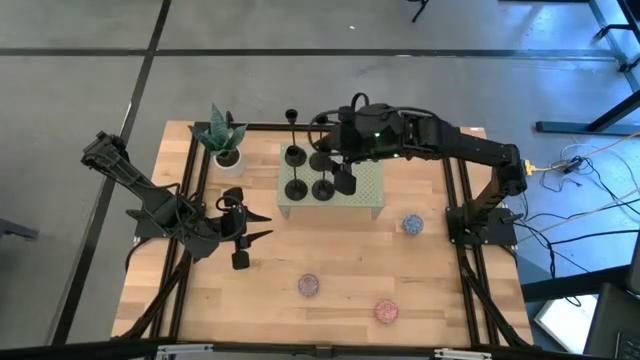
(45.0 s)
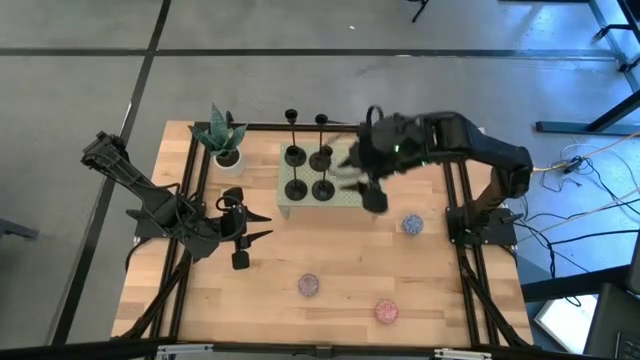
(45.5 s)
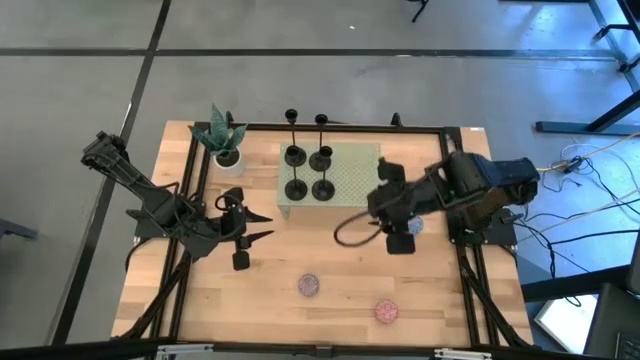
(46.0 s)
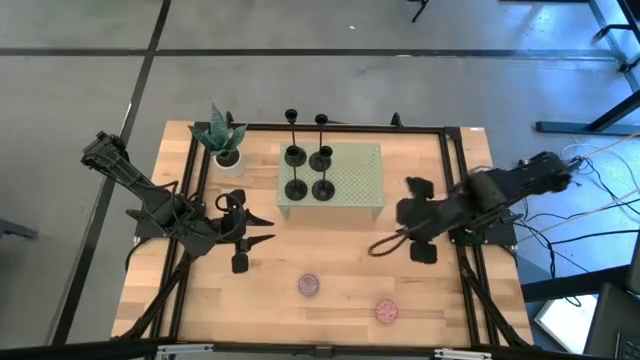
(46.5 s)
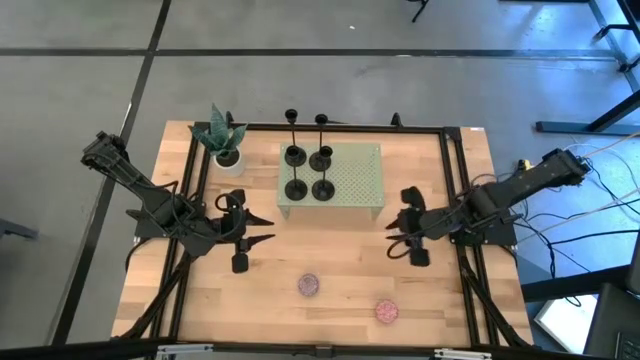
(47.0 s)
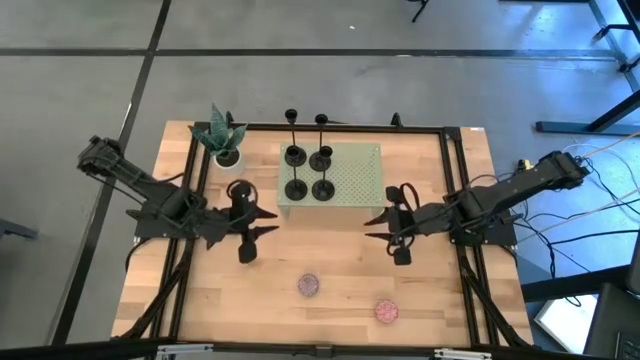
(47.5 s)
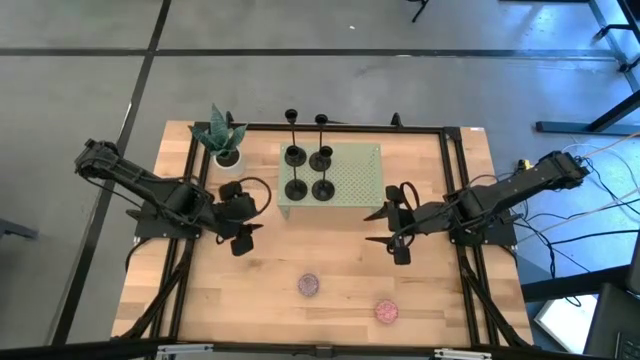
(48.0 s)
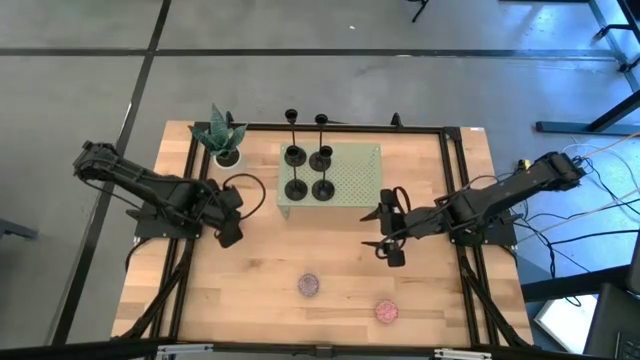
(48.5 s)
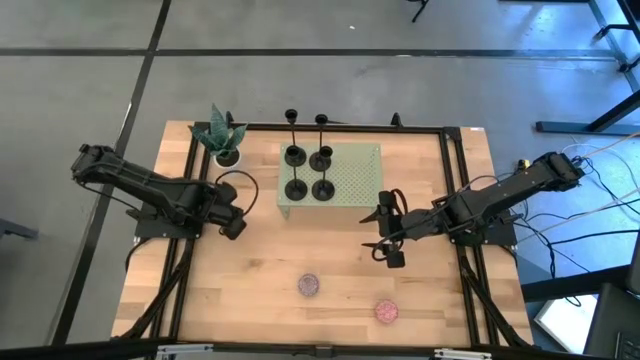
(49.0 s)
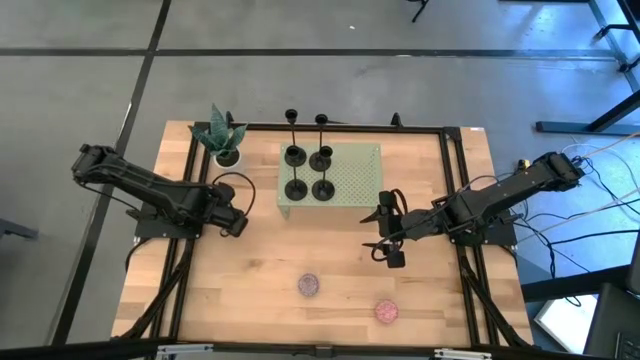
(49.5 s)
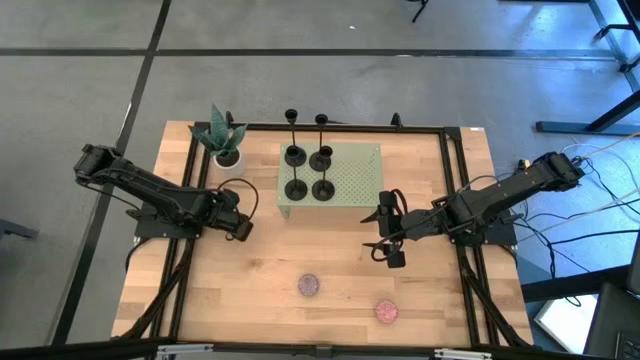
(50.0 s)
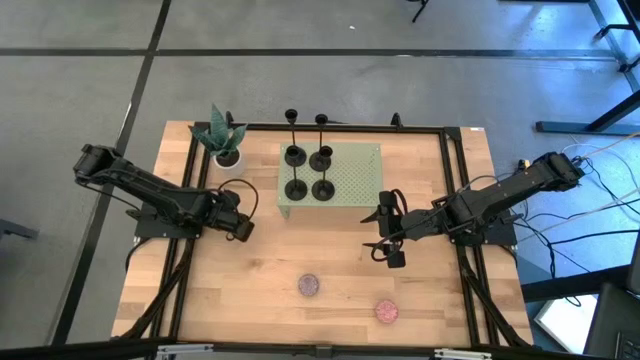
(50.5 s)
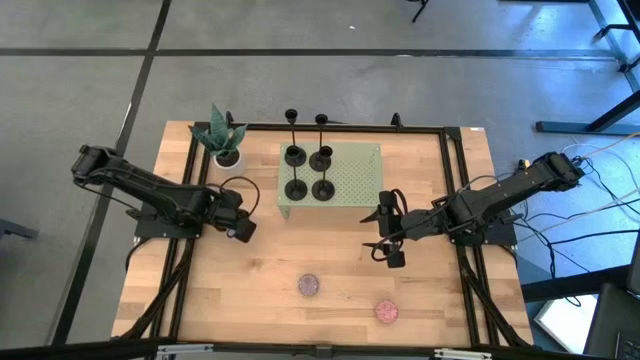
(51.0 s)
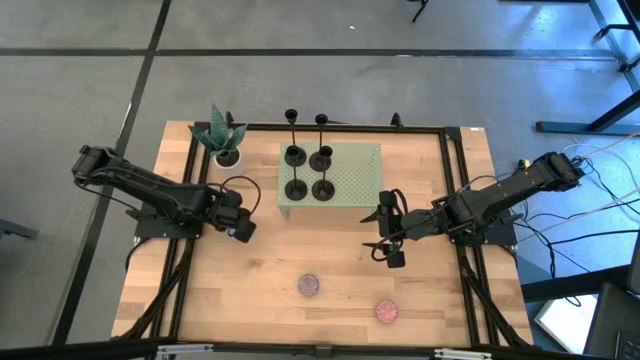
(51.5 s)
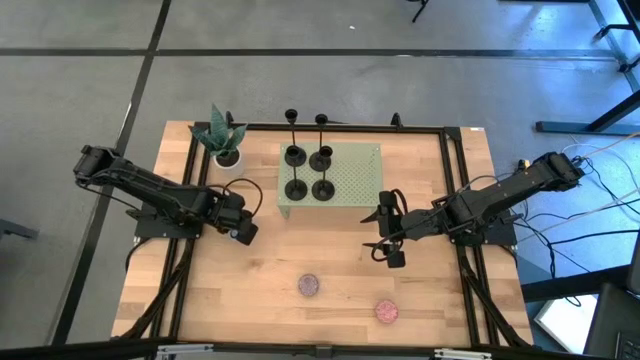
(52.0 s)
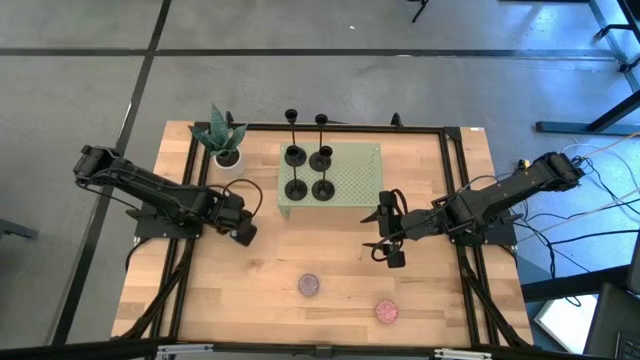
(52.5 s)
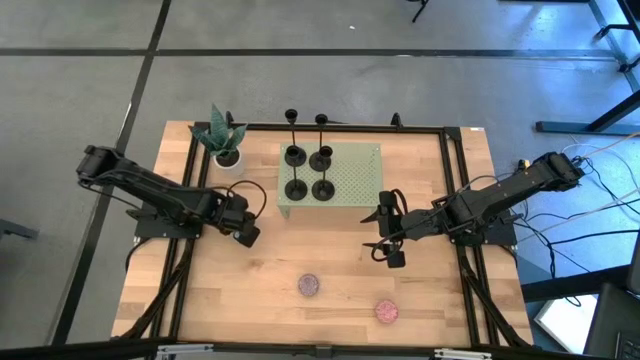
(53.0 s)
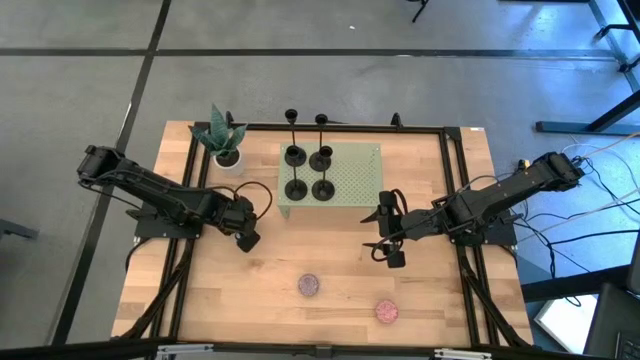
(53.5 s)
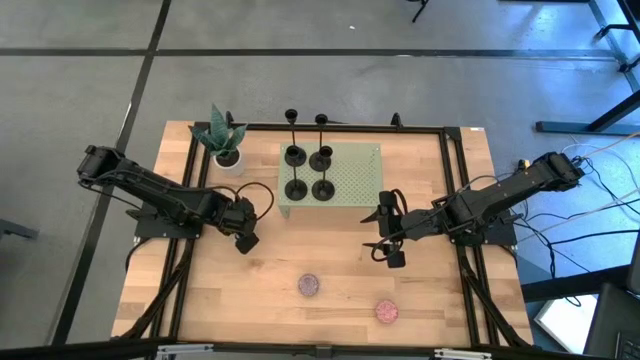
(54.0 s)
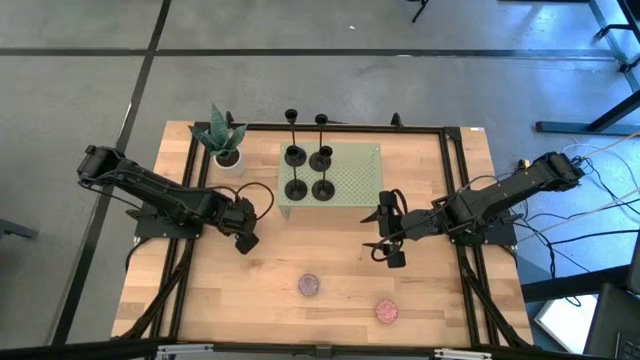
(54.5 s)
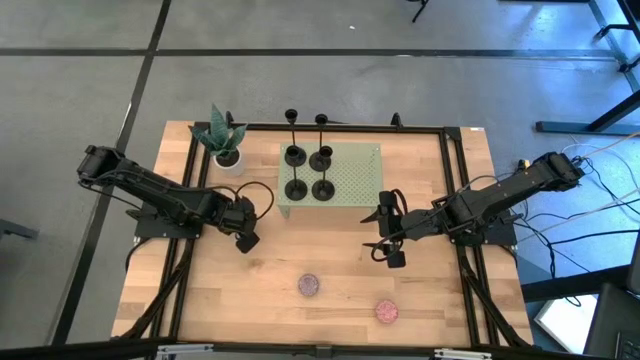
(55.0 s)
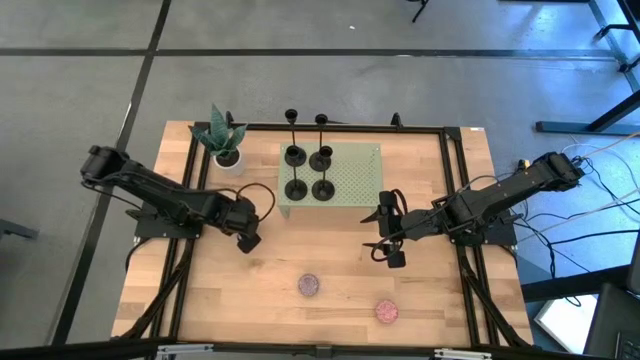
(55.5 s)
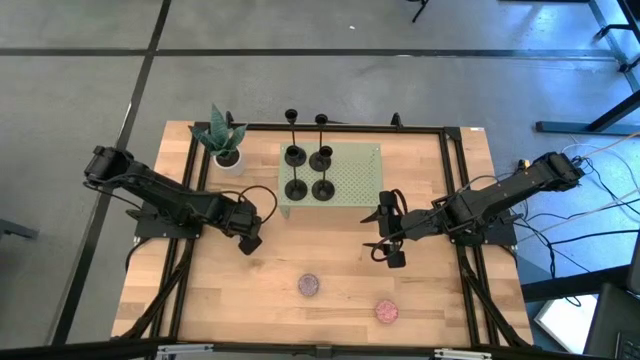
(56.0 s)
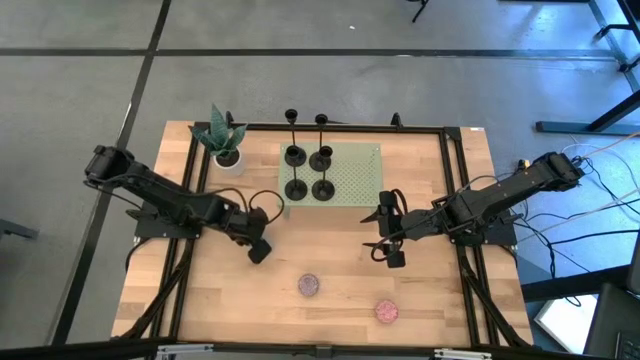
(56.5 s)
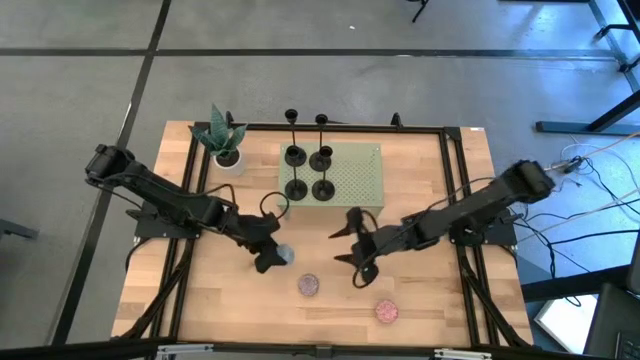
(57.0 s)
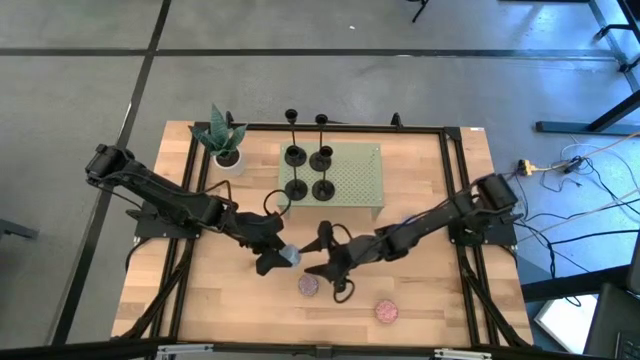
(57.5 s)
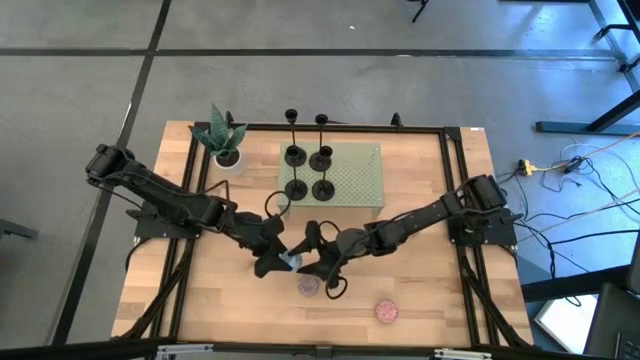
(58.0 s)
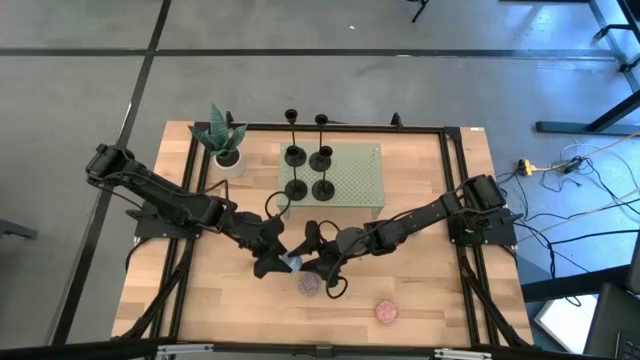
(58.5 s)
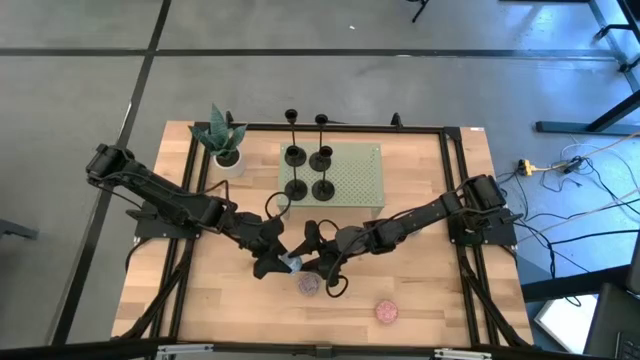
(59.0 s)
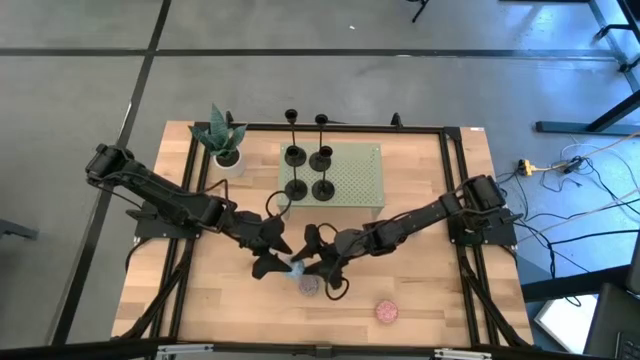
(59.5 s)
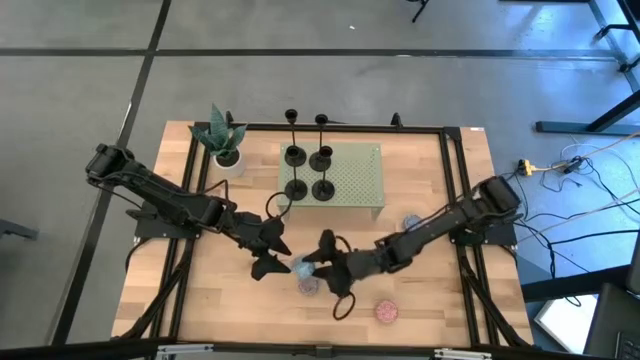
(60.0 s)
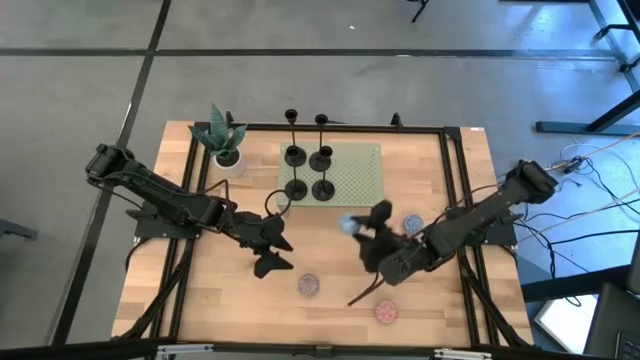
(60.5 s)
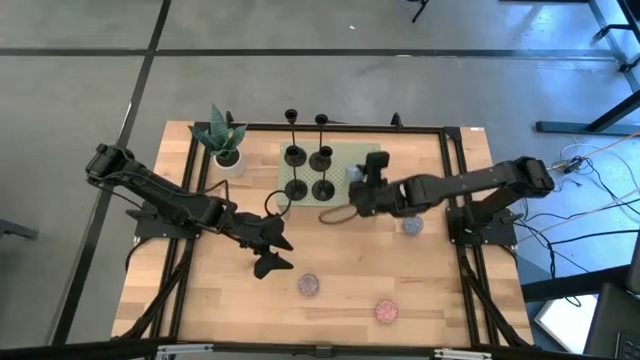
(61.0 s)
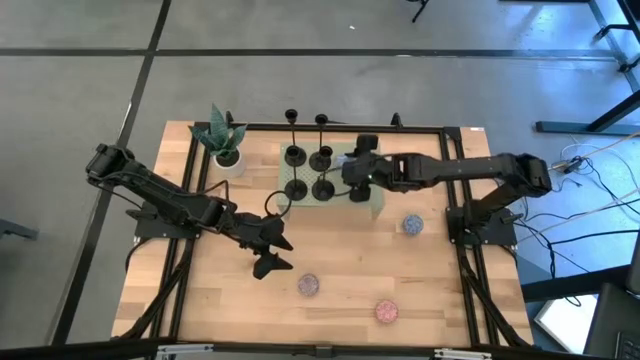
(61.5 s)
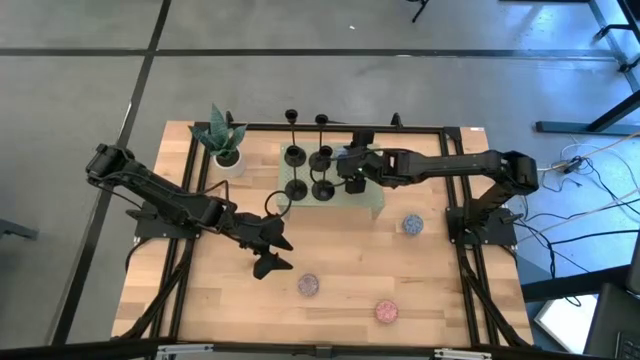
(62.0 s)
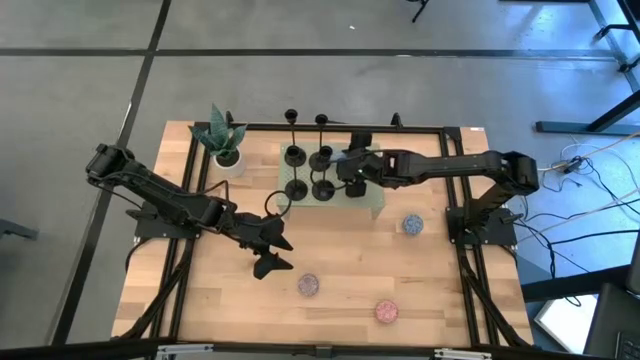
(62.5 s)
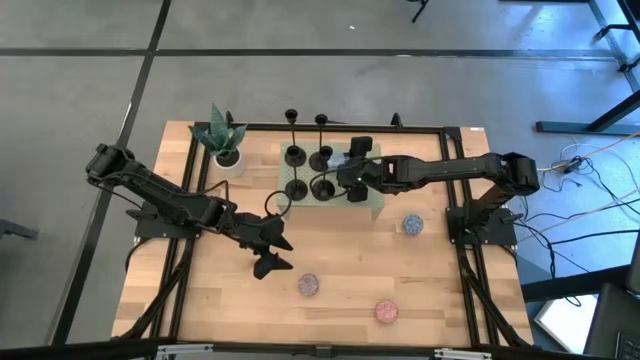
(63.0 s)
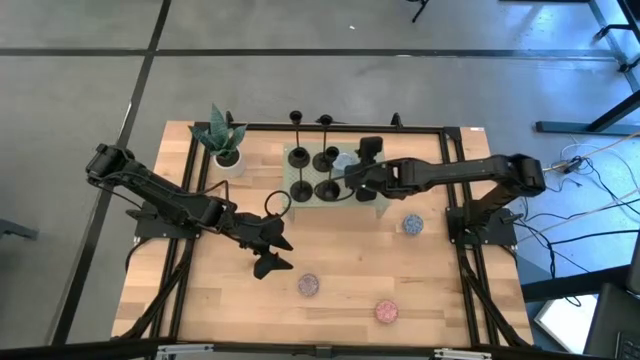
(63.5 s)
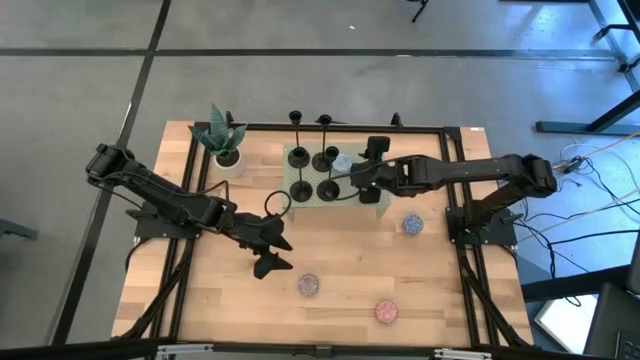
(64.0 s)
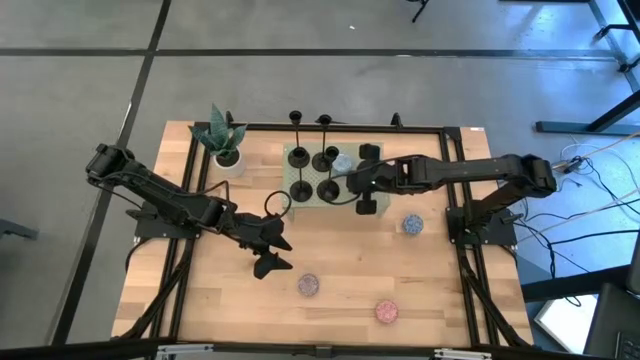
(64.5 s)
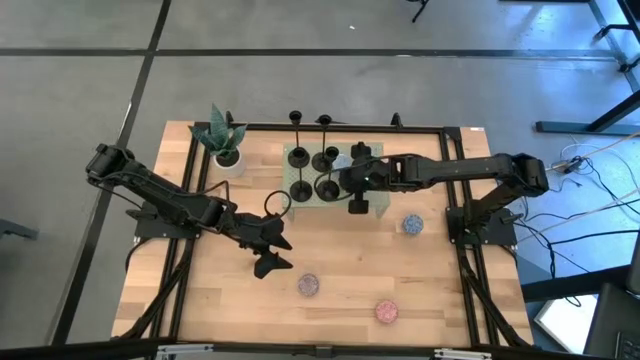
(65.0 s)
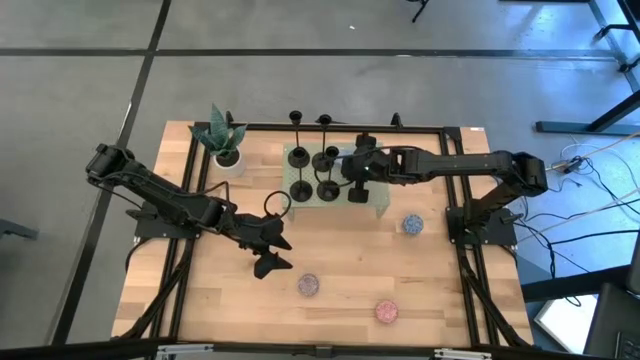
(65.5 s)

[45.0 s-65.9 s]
Task: Pick & Place candle stick holders
Put the light blue scented candle on the shelf
